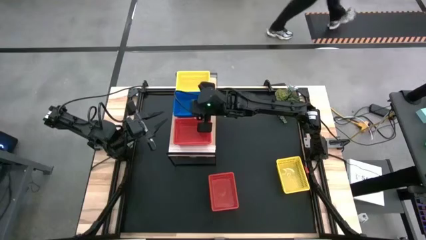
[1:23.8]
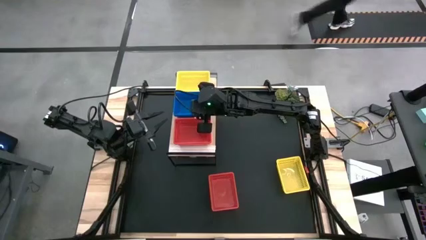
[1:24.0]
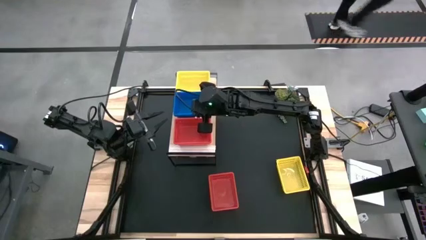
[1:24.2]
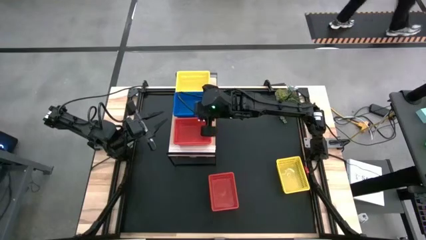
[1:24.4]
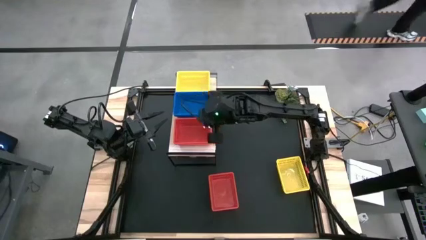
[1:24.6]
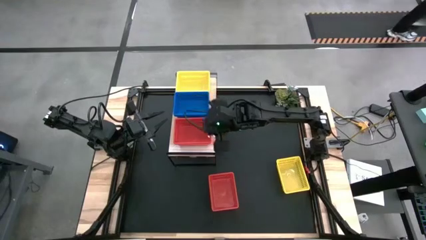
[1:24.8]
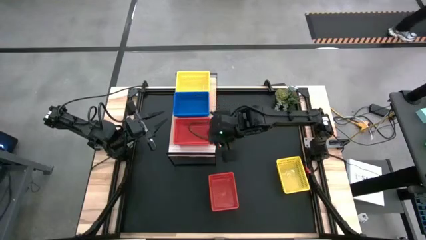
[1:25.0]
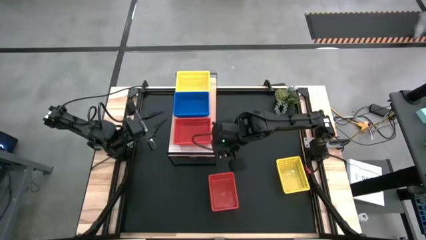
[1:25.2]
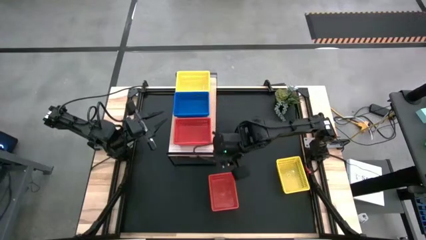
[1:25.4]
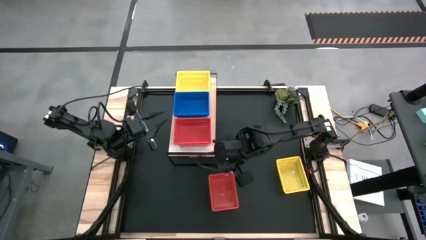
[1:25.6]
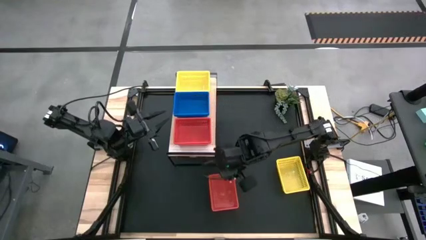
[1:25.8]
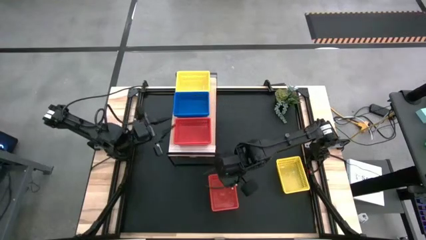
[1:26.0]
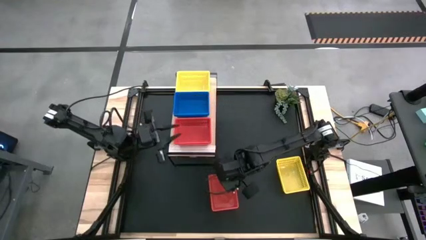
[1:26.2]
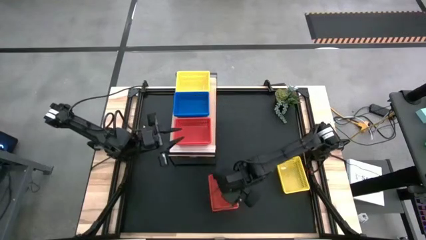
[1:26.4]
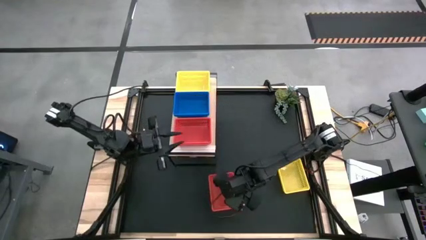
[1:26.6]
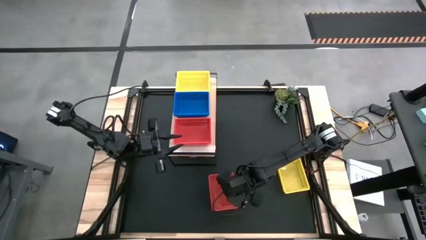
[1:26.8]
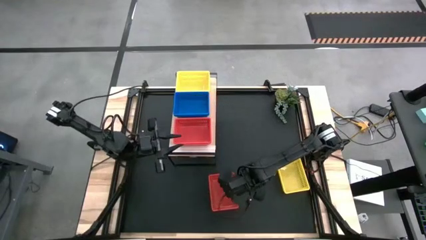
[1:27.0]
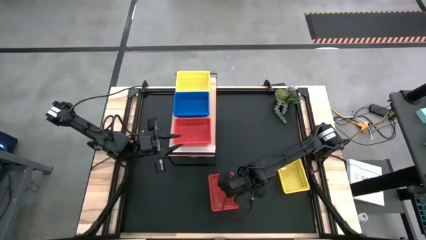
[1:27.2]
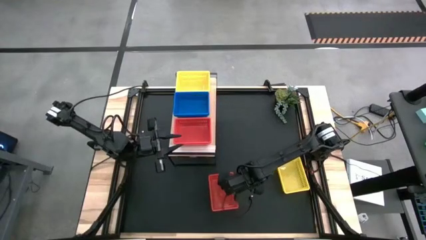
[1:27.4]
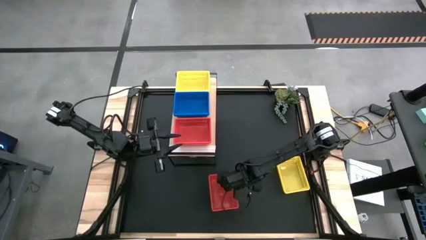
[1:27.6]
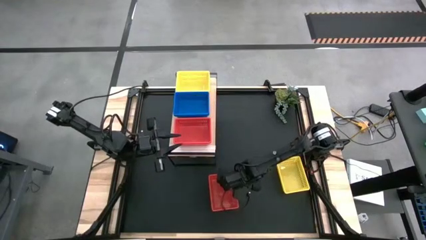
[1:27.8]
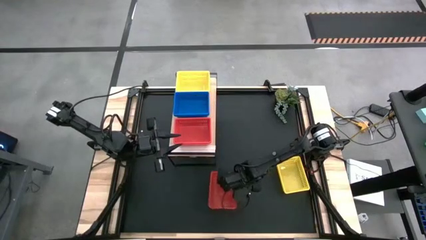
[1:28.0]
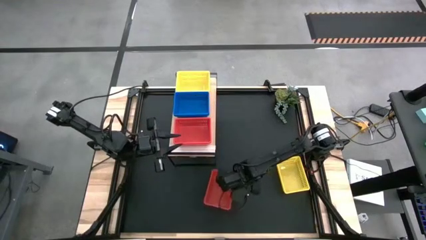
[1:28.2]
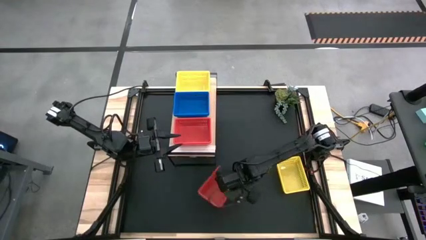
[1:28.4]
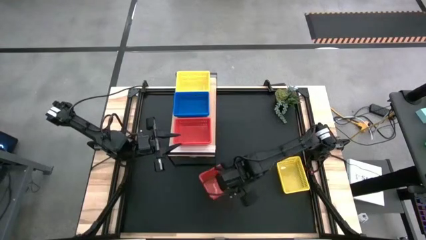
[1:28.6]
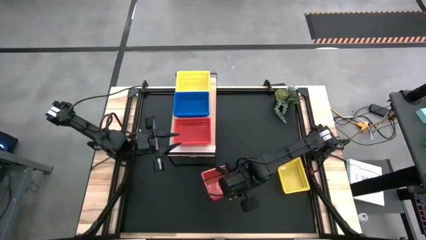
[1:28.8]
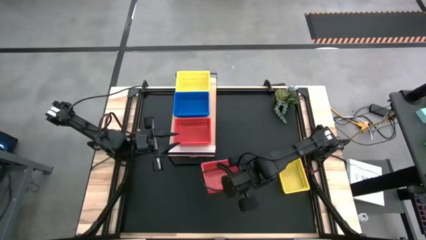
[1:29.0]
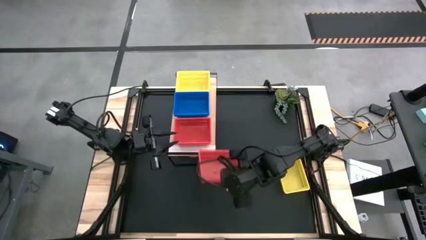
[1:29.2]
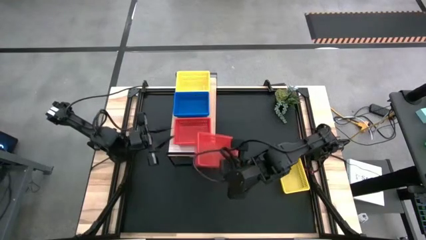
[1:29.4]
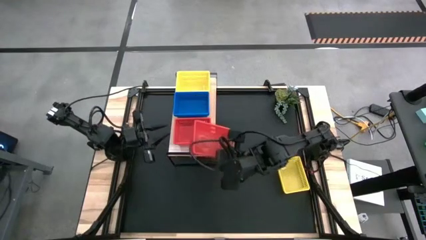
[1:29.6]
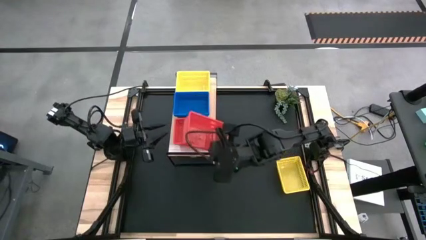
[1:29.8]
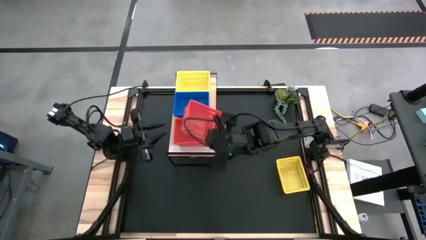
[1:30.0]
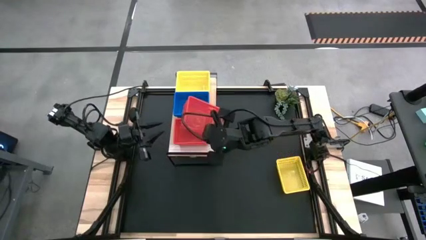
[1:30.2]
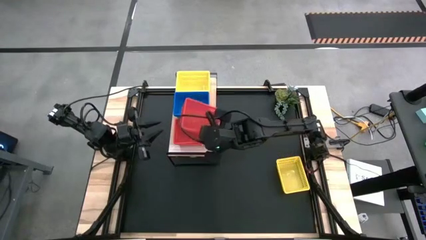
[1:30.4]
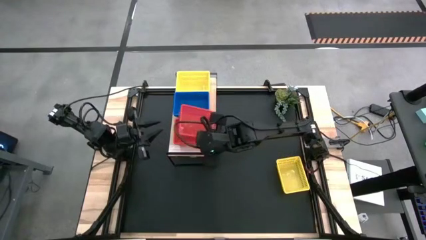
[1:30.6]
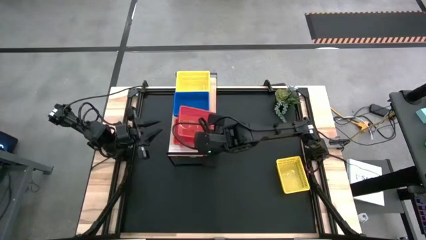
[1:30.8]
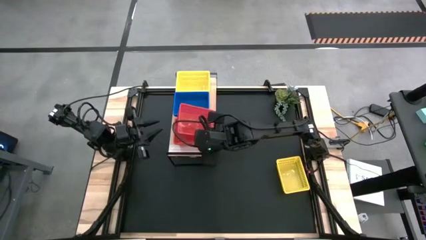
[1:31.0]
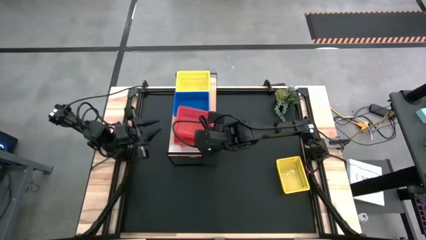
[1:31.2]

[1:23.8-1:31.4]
Task: Stack baskets on shelf by color
Stack the red bin on top of the red bins on the shelf

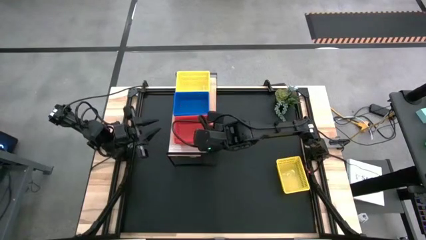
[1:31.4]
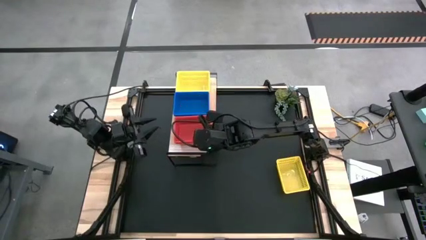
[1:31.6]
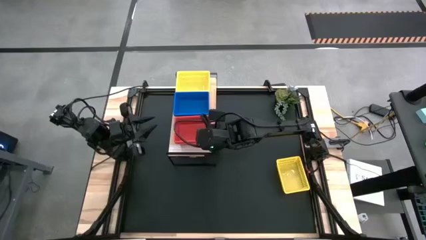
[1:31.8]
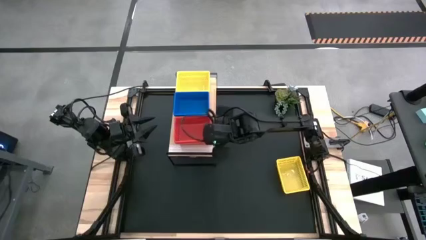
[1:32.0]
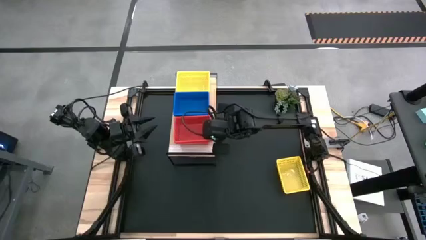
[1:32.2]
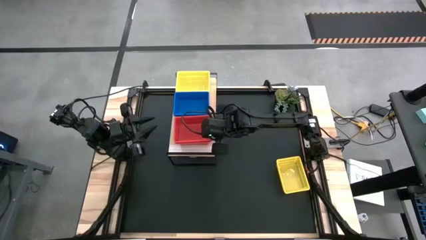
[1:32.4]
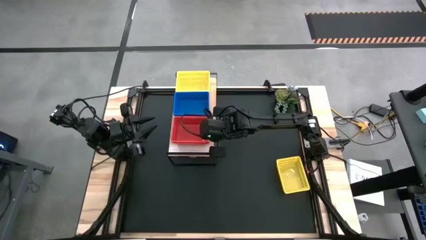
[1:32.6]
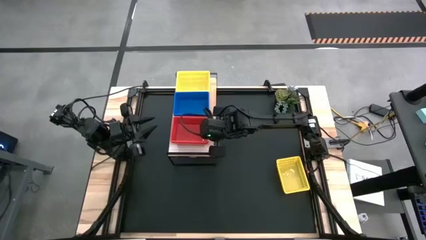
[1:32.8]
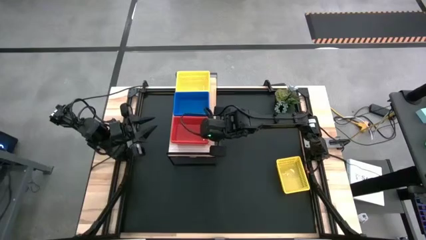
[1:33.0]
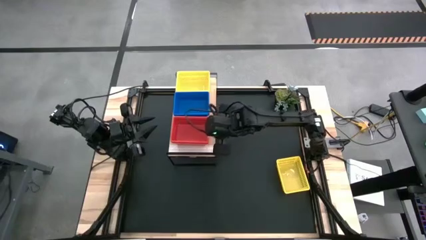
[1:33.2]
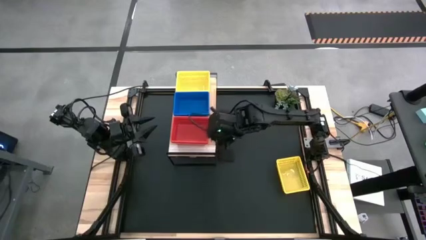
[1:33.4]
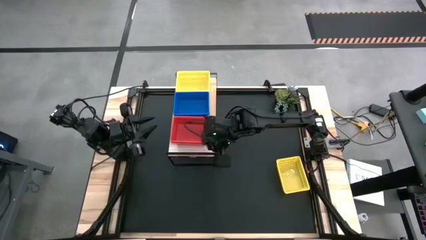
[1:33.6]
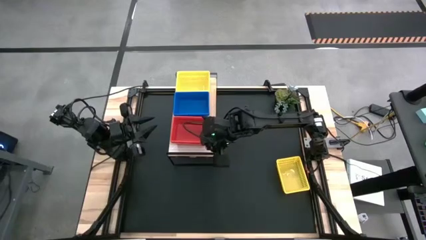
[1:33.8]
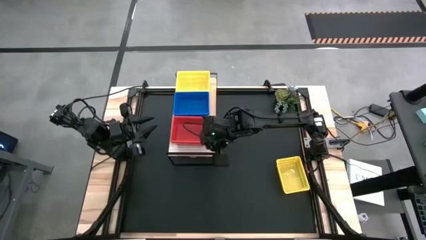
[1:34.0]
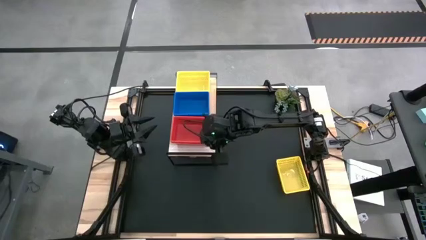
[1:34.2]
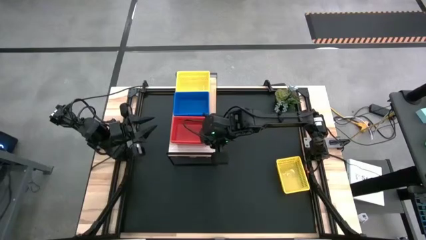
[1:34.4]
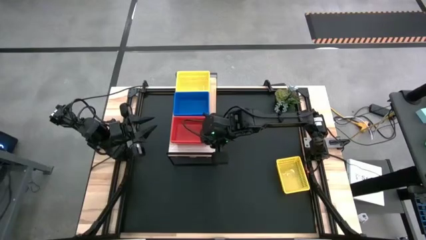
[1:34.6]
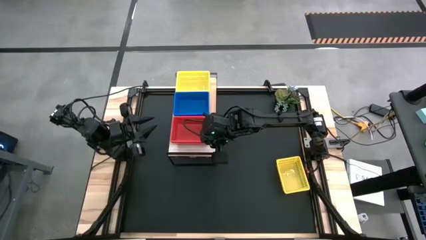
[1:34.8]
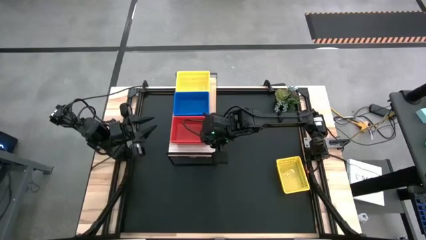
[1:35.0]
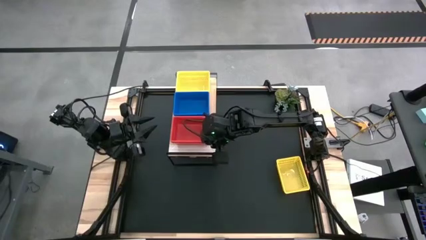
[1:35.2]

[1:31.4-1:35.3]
Adjust the red bins on the shelf

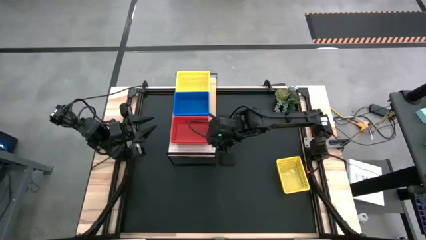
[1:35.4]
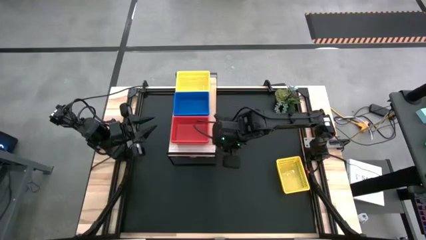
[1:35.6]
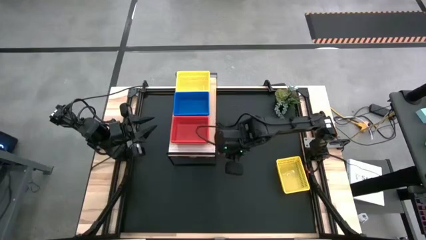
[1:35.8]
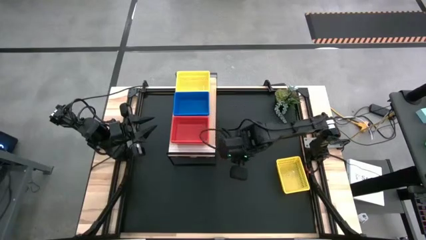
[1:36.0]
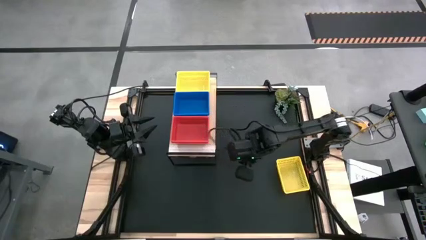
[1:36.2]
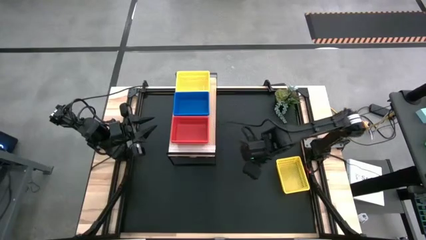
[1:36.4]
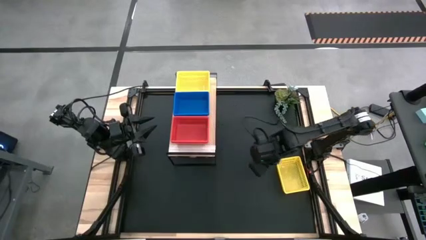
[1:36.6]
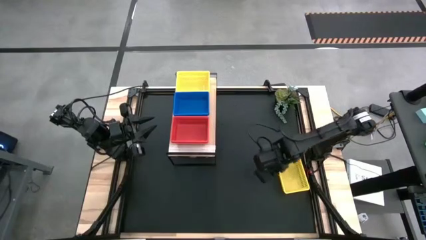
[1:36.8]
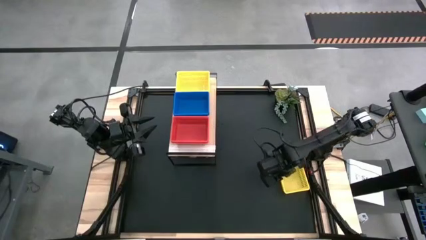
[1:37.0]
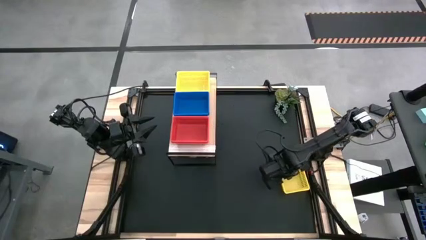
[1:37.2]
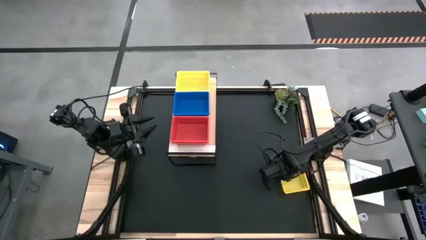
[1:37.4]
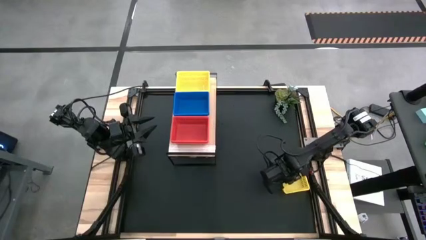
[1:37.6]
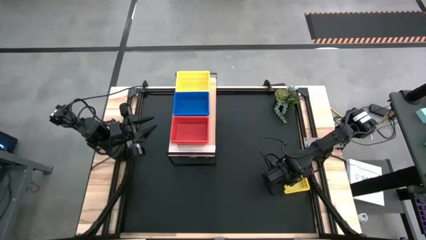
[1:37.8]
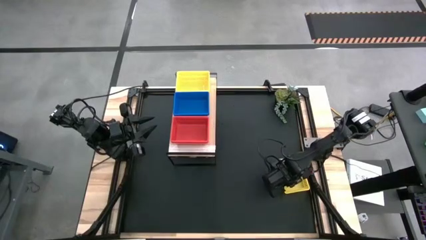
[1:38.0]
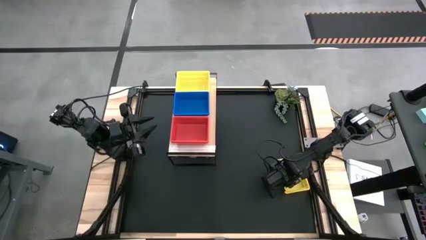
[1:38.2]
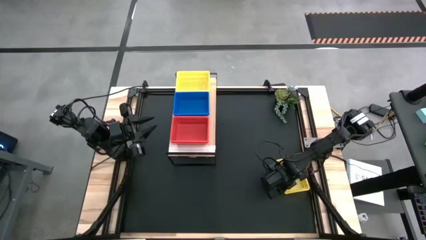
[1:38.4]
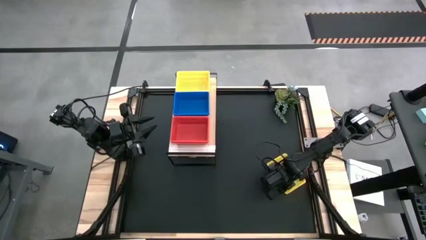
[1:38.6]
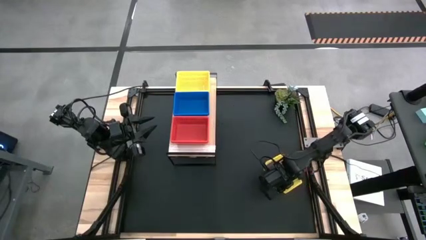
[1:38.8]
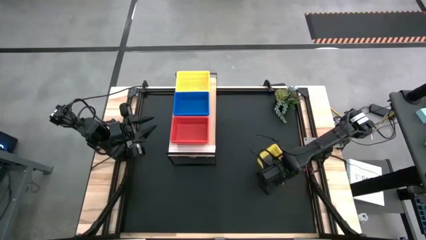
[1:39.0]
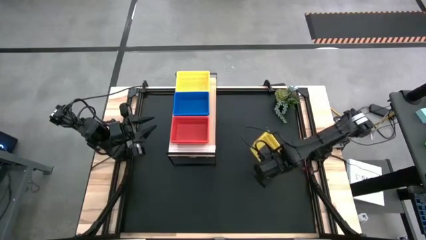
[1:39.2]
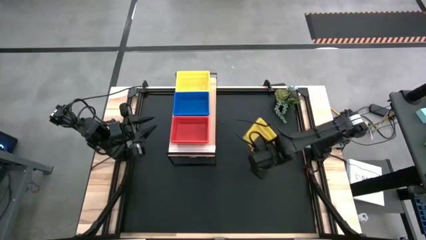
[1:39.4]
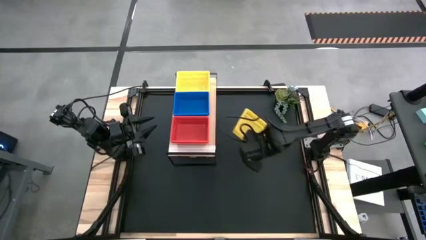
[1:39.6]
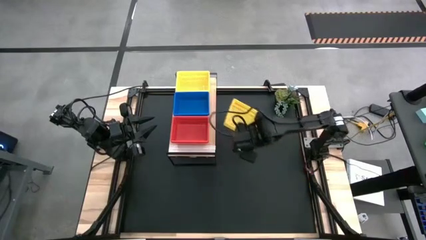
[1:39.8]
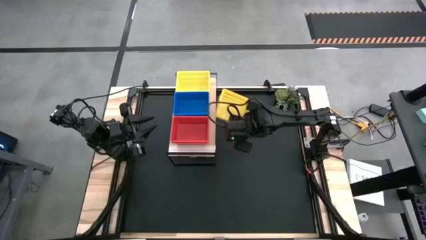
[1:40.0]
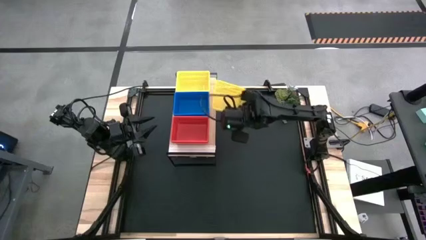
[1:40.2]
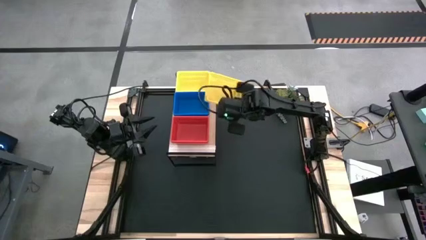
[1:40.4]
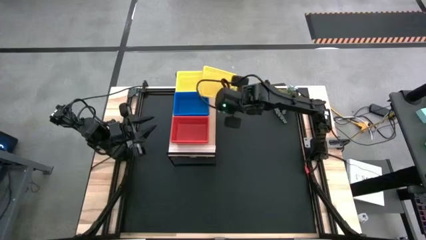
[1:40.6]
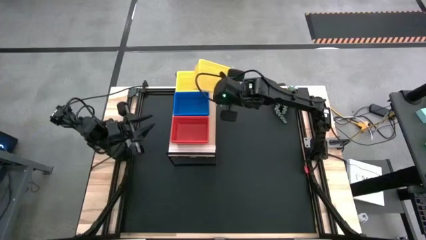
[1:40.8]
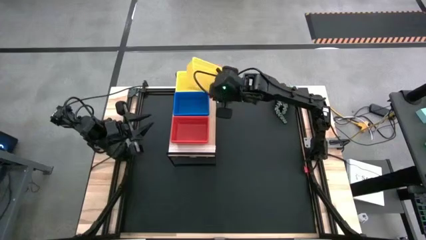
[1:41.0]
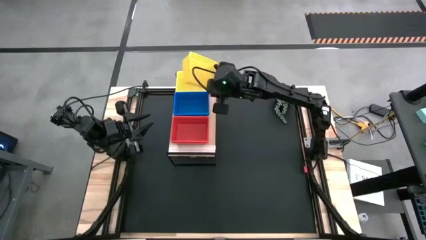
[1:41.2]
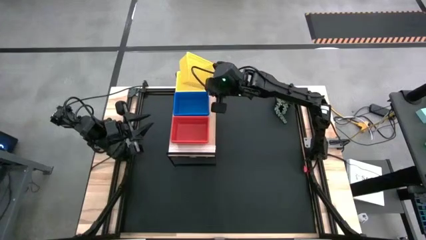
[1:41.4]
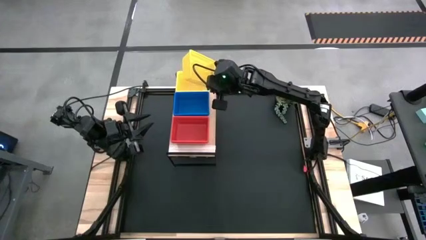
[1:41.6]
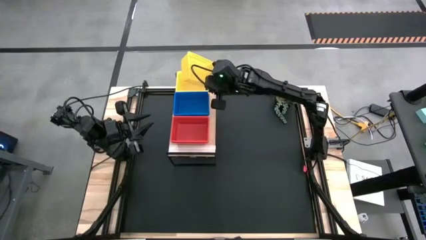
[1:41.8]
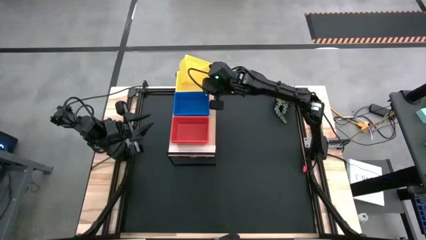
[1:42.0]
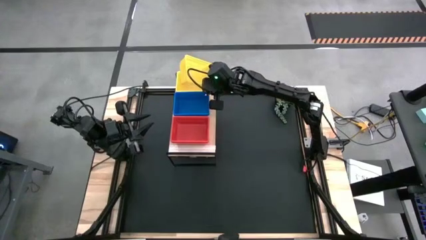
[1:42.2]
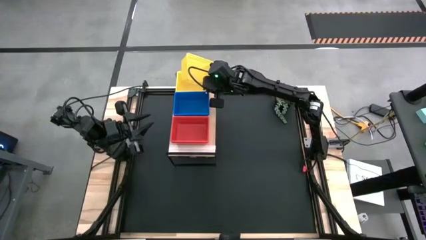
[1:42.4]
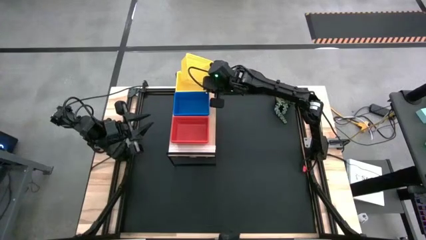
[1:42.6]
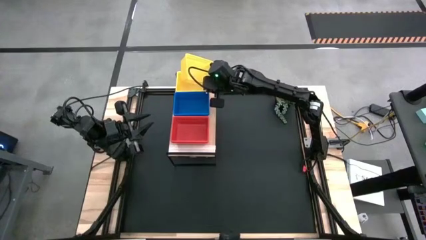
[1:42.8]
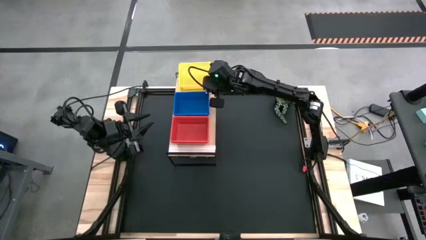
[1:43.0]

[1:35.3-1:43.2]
Stack the yellow bin on top of the yellow bins on the shelf
